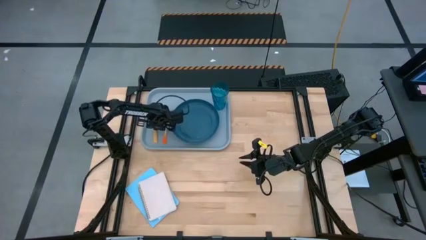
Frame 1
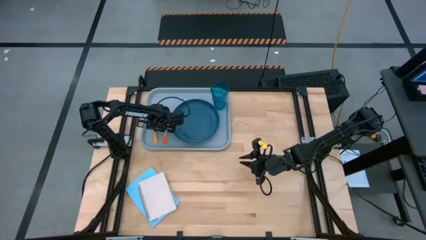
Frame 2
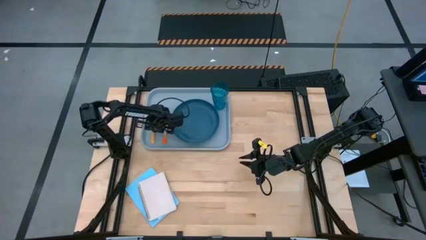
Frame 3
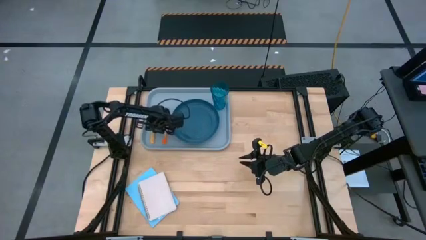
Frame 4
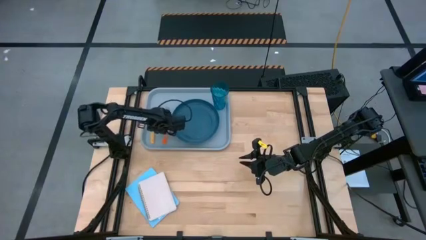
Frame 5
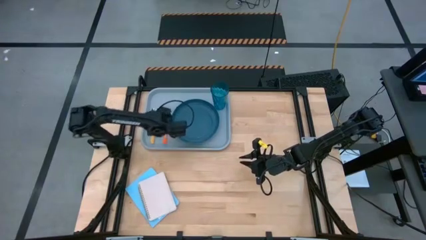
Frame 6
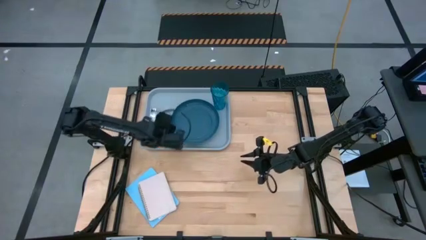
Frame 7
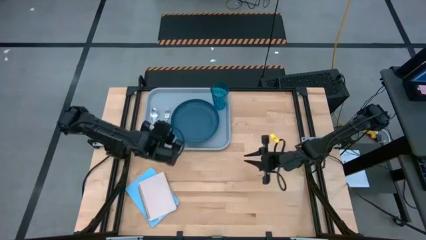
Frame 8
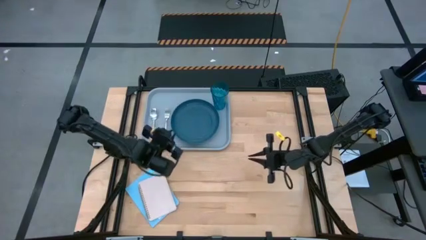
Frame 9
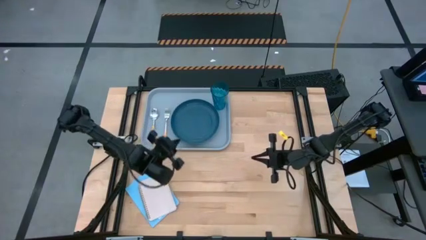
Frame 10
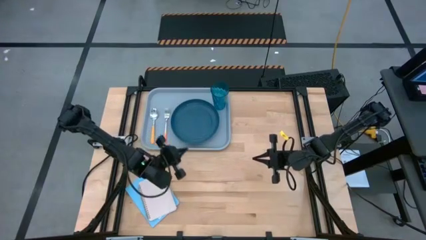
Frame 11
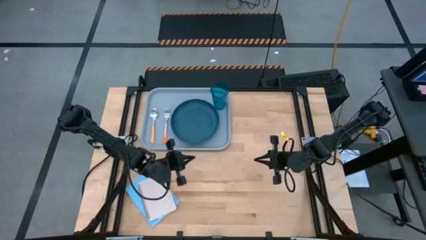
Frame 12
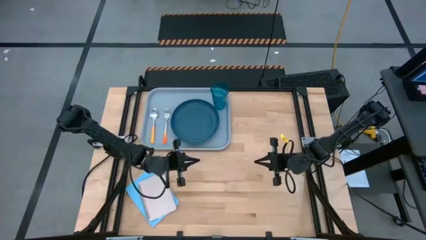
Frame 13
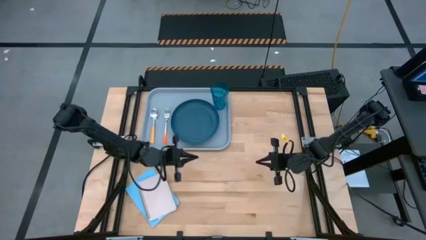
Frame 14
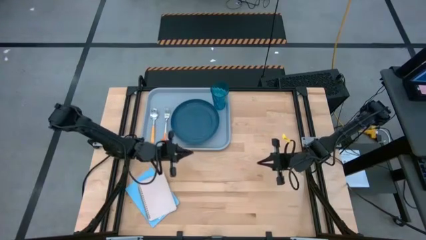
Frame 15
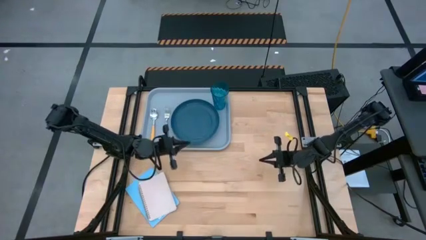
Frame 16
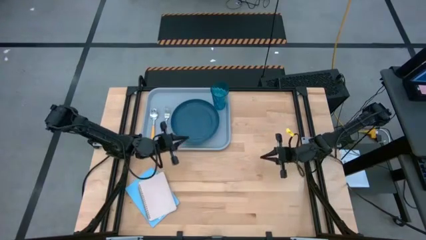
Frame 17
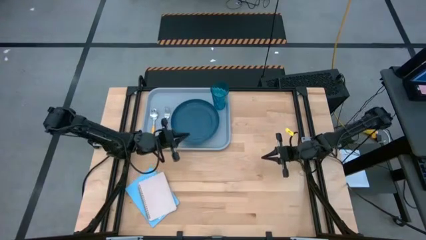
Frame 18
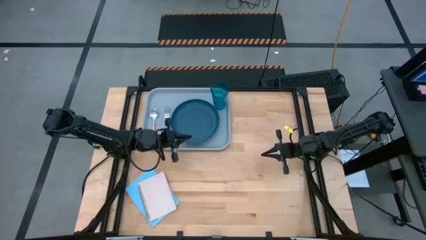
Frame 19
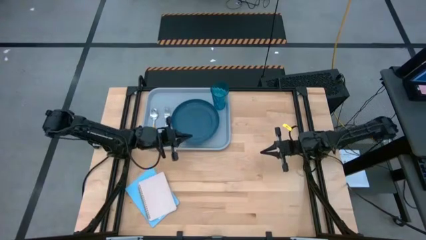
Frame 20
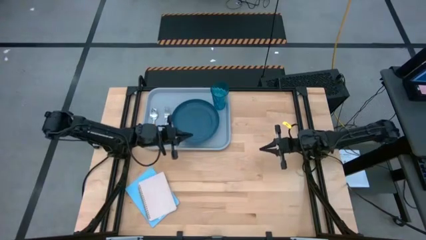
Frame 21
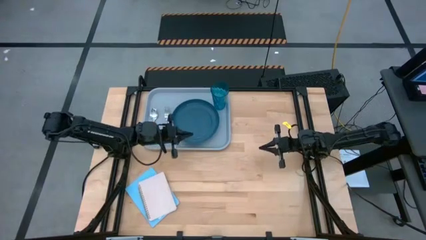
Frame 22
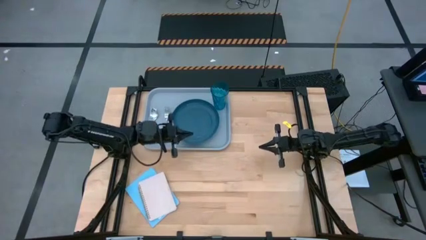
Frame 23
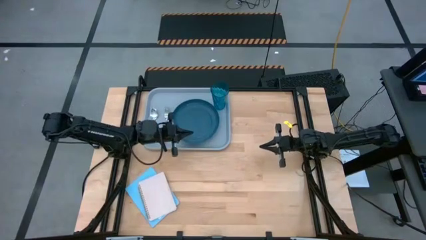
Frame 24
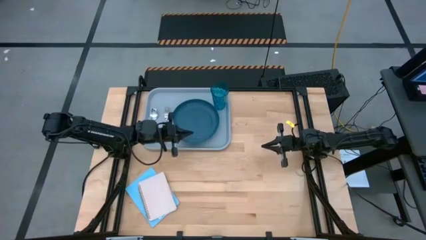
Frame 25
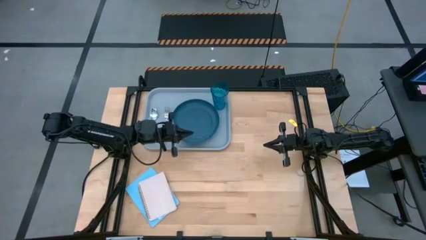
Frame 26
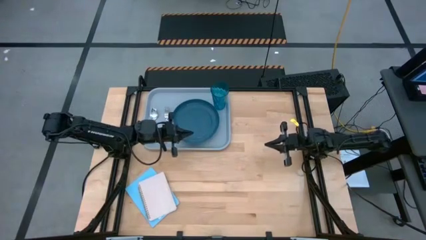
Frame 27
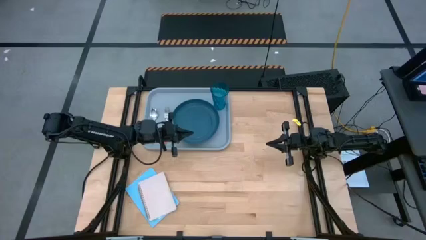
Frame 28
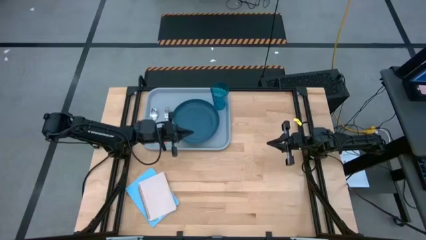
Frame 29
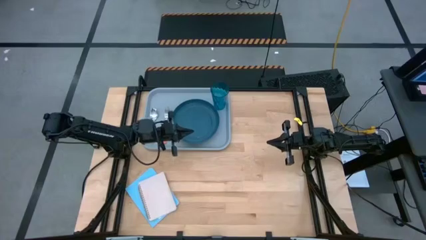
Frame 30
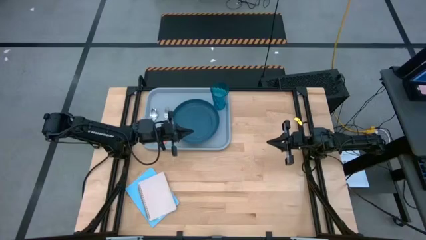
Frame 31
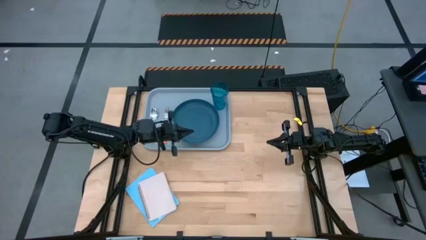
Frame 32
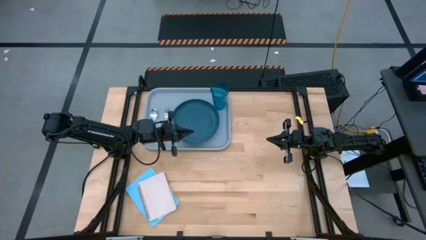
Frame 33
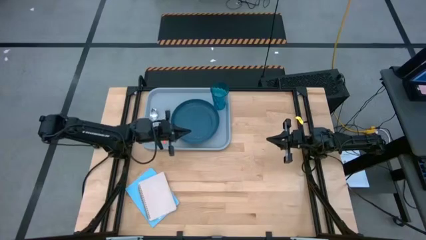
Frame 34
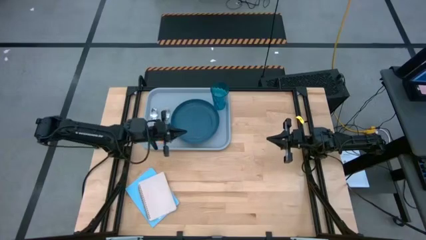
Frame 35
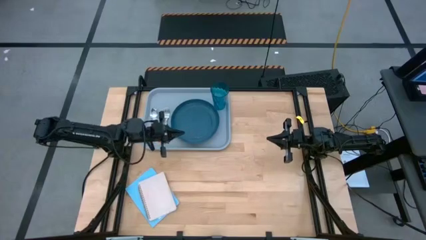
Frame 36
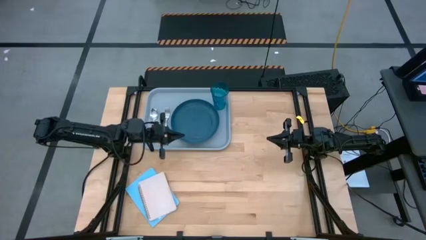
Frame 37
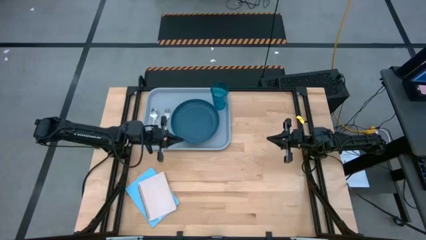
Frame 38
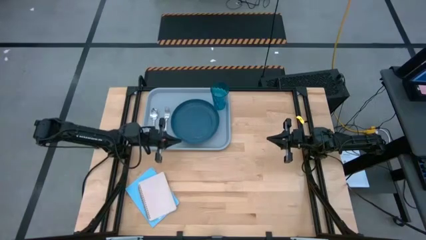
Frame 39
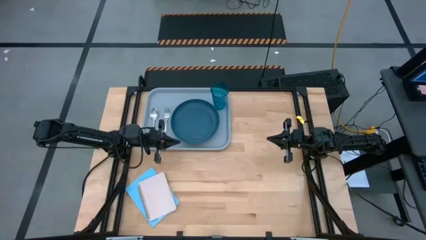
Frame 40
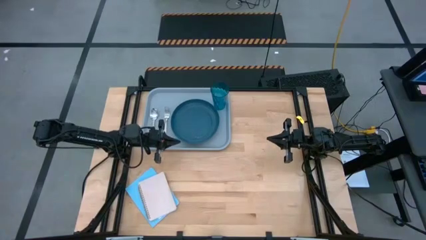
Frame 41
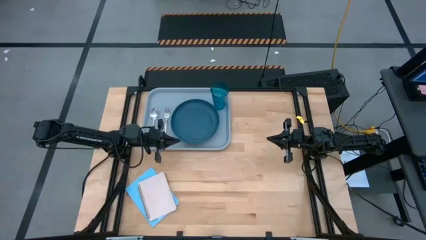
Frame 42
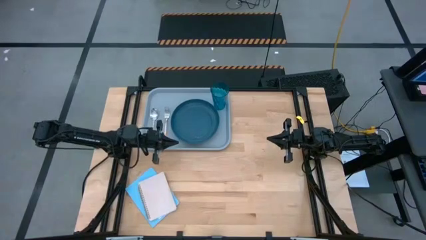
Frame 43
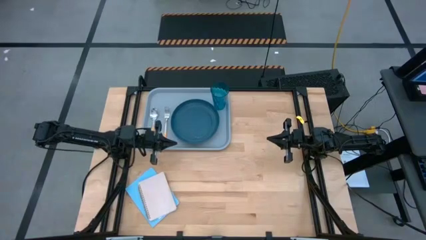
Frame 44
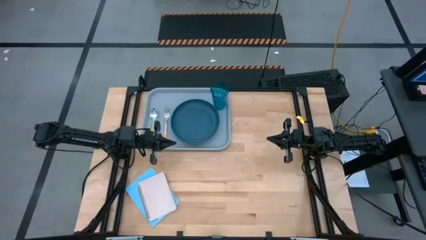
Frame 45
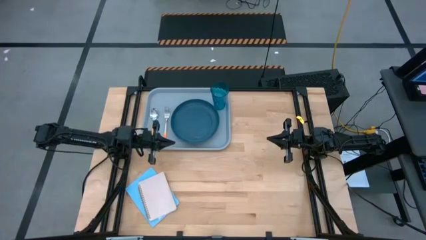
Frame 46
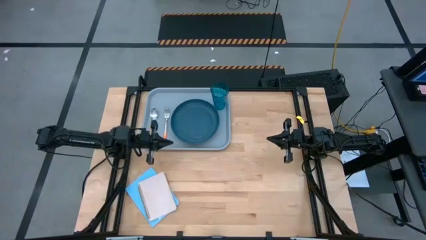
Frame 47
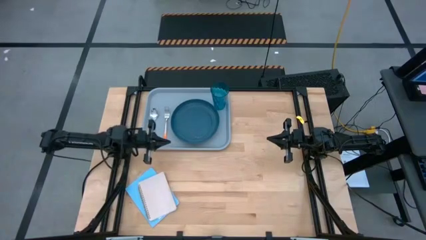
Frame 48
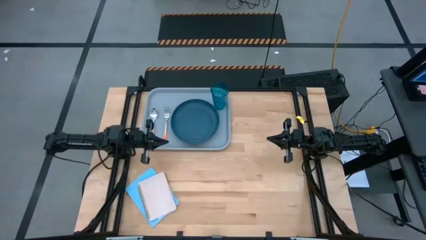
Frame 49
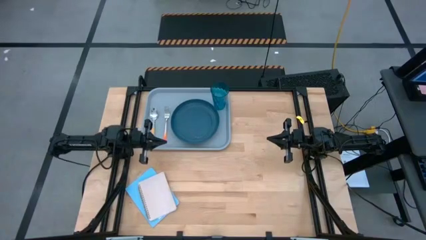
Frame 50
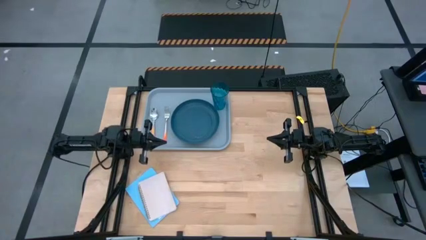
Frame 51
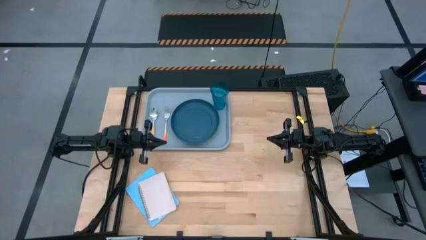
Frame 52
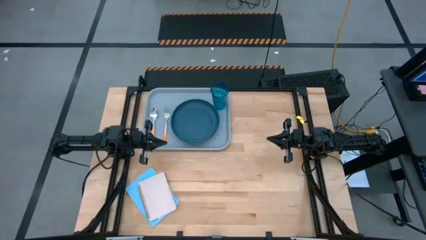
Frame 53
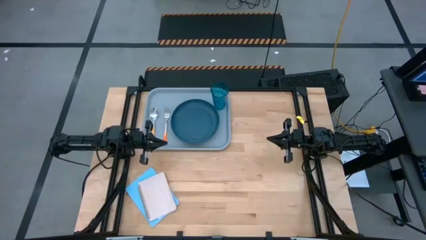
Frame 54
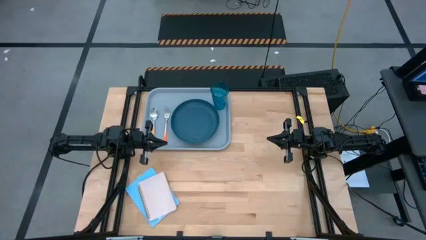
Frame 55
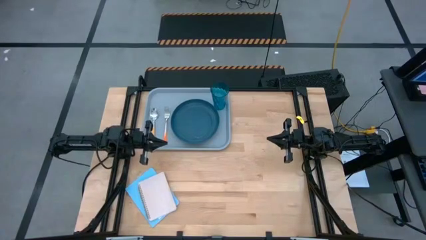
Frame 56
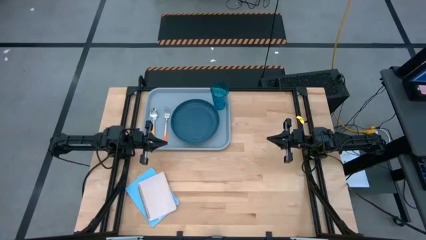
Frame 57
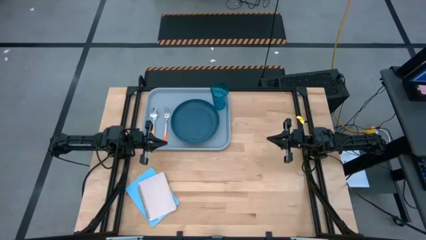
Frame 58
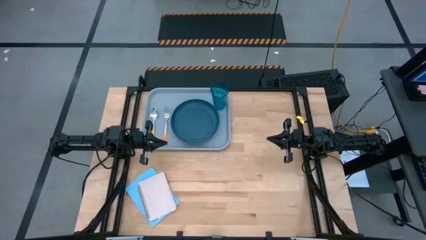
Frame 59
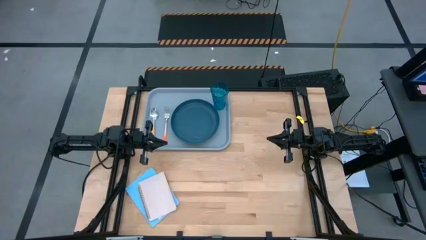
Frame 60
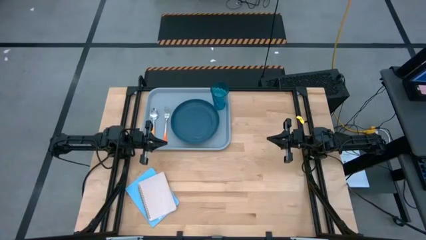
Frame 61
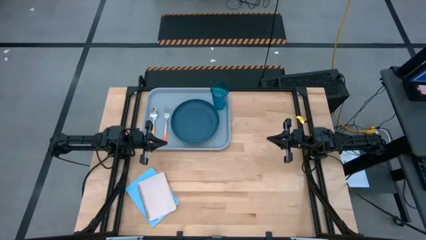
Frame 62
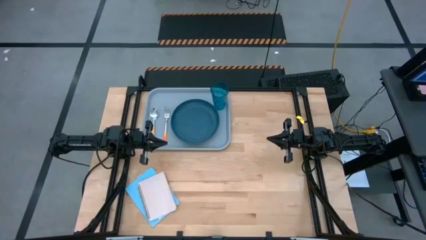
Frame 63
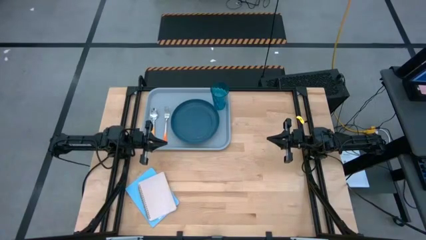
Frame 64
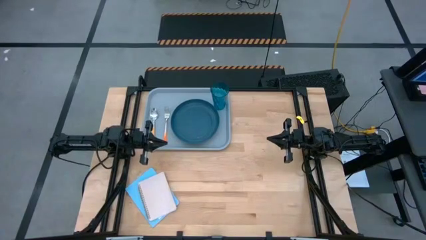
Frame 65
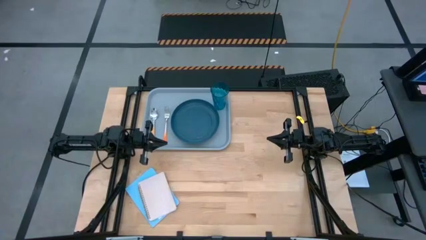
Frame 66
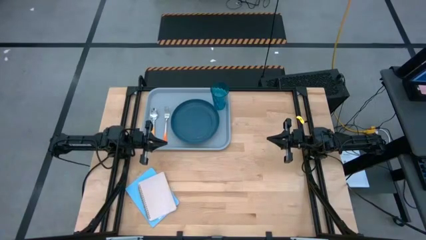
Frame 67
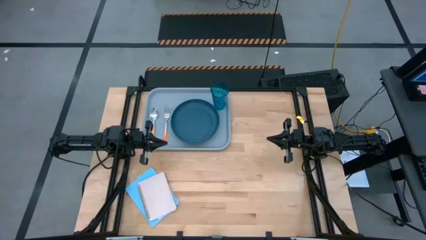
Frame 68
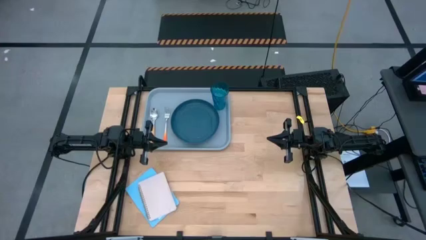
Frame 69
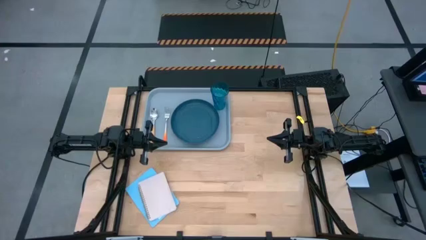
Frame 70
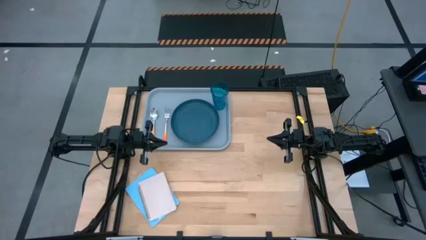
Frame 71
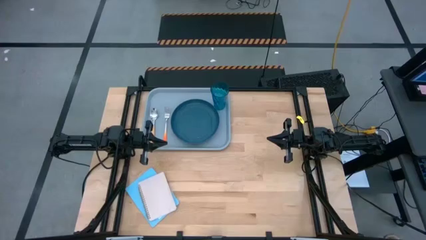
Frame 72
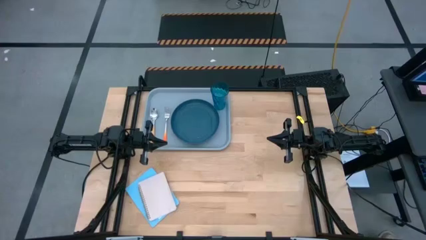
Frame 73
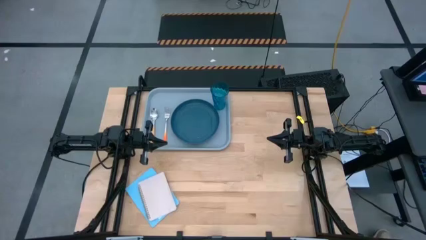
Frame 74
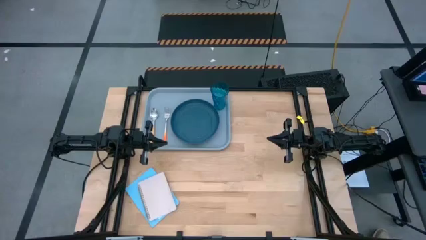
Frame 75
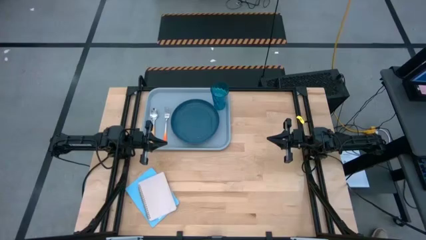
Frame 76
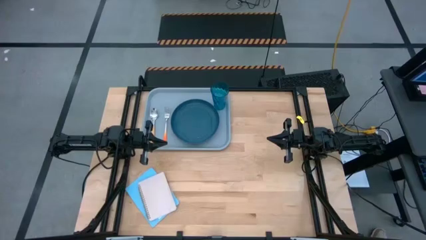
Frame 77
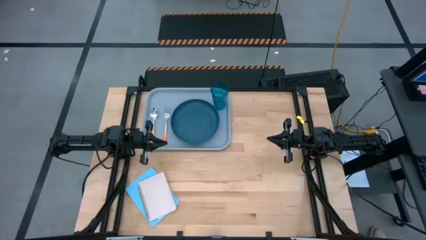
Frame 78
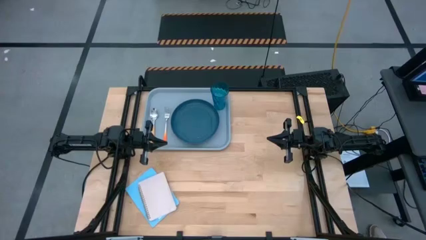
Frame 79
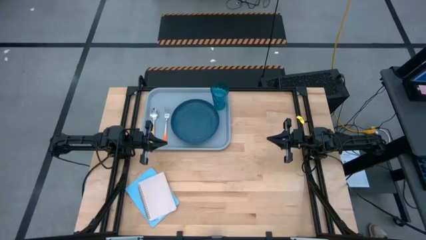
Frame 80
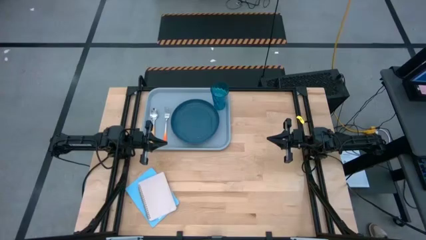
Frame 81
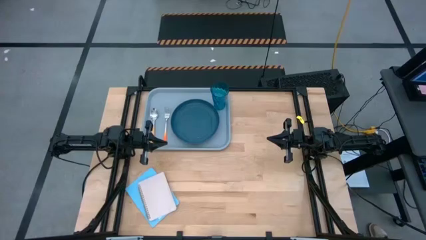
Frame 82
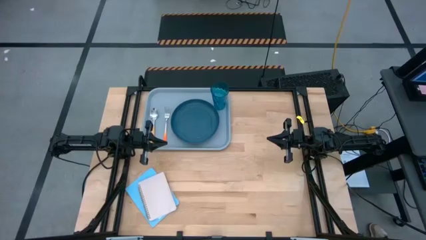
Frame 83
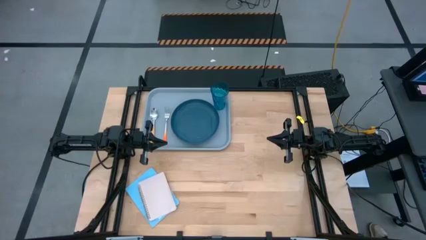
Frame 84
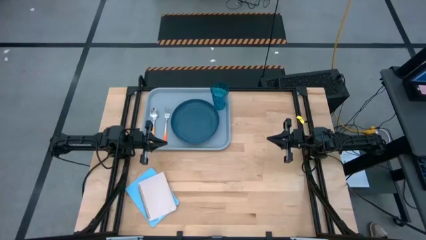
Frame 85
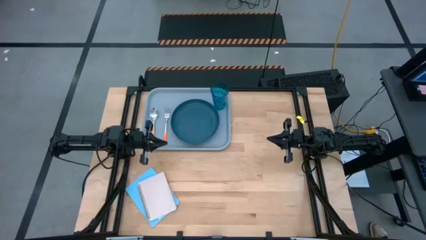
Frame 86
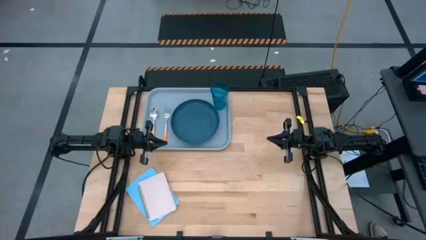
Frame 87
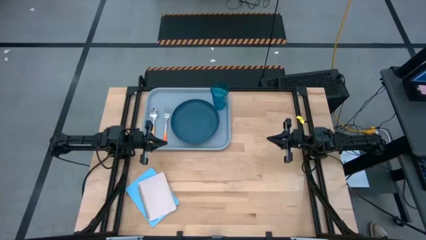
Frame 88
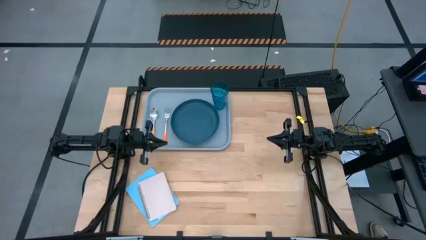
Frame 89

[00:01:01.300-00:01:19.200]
Task: Pick and place plate/cup/fork/spoon on tray
Return to Home Position
